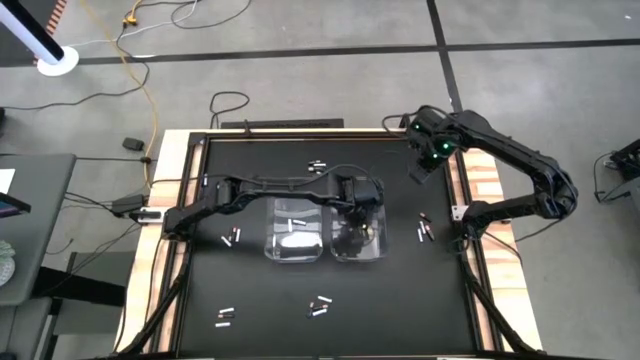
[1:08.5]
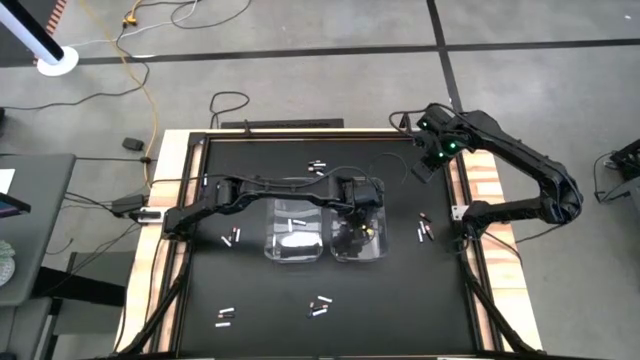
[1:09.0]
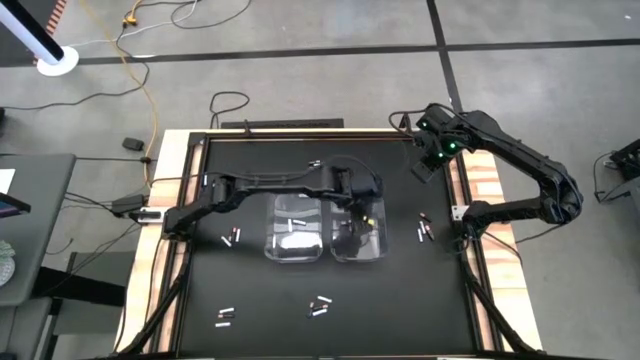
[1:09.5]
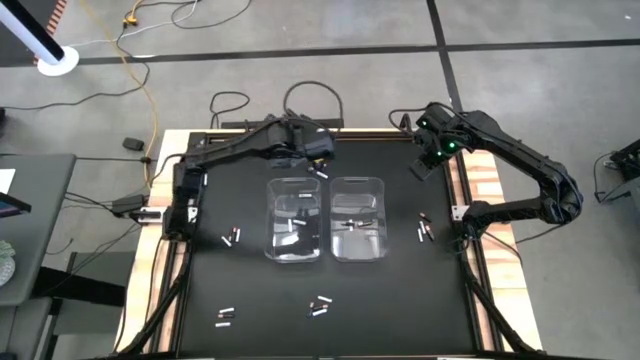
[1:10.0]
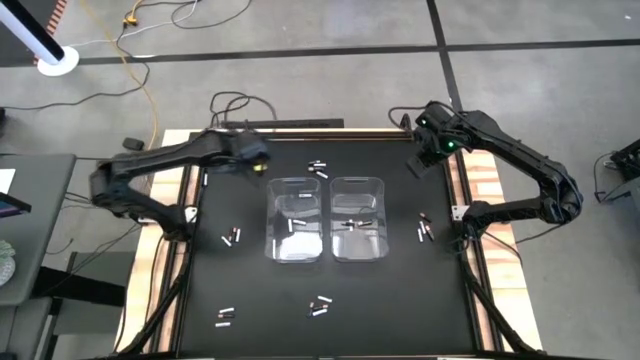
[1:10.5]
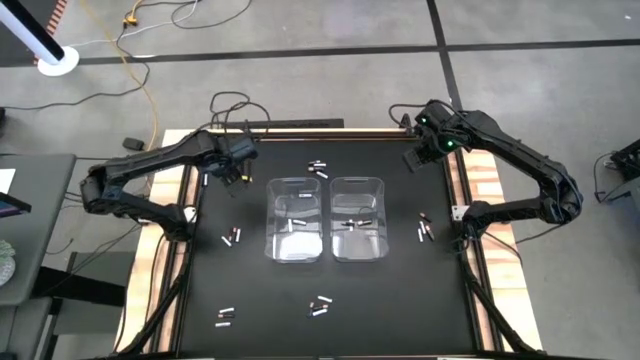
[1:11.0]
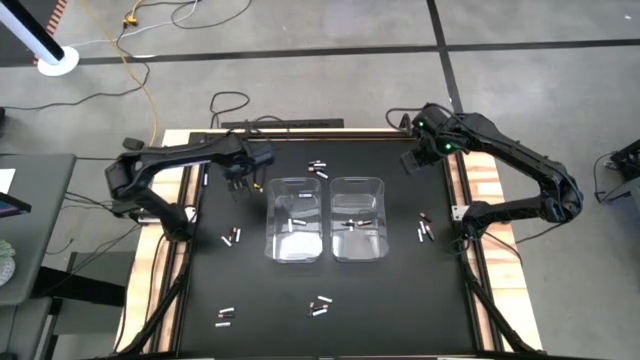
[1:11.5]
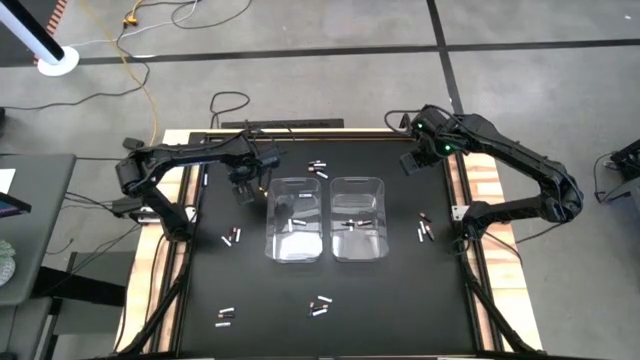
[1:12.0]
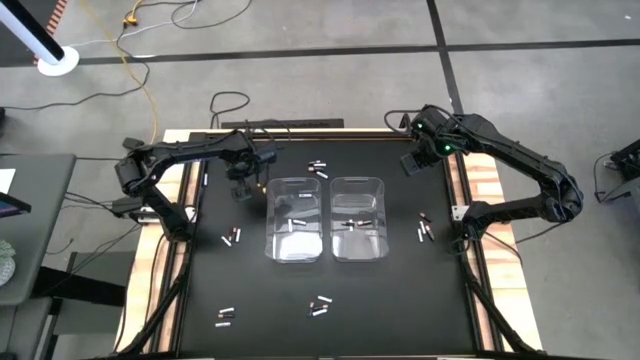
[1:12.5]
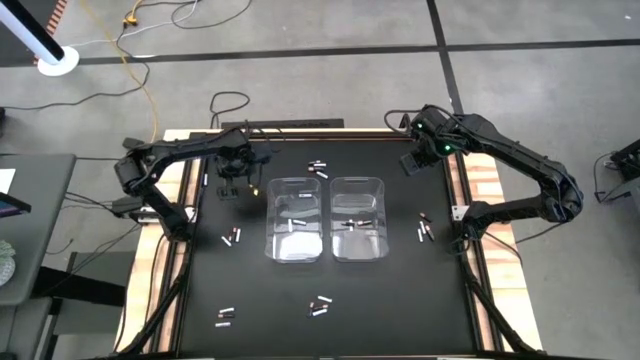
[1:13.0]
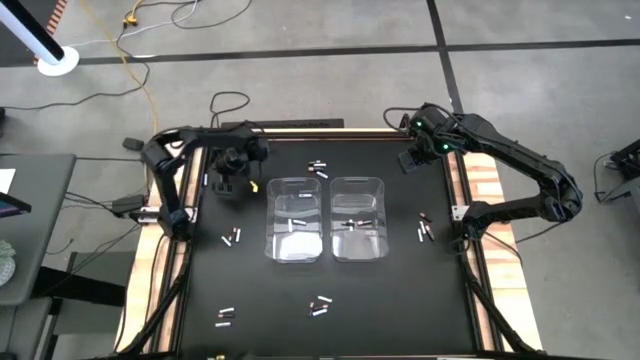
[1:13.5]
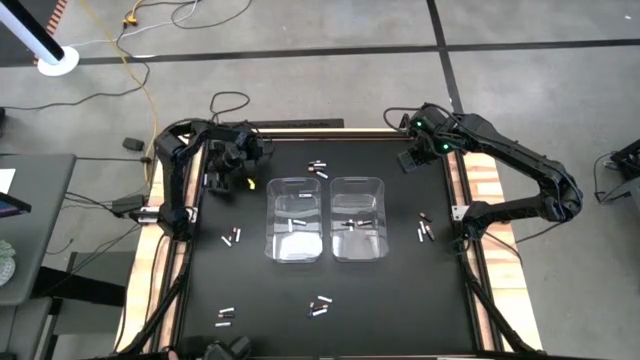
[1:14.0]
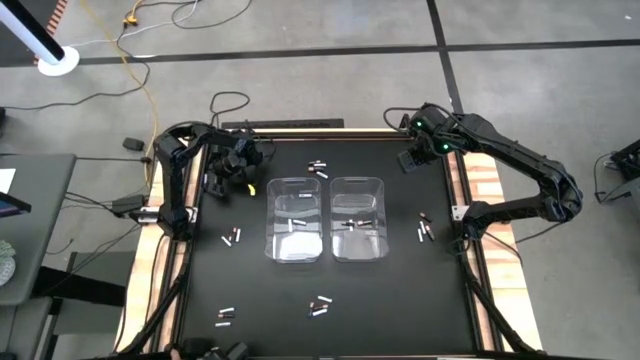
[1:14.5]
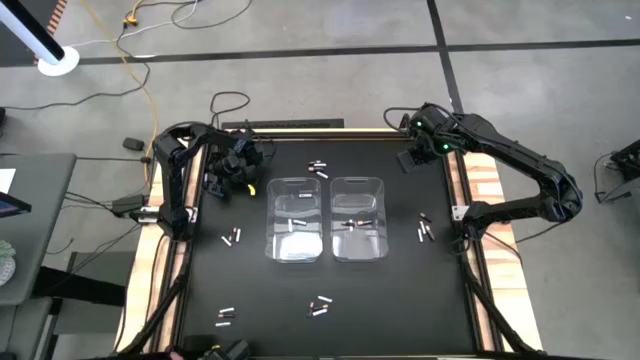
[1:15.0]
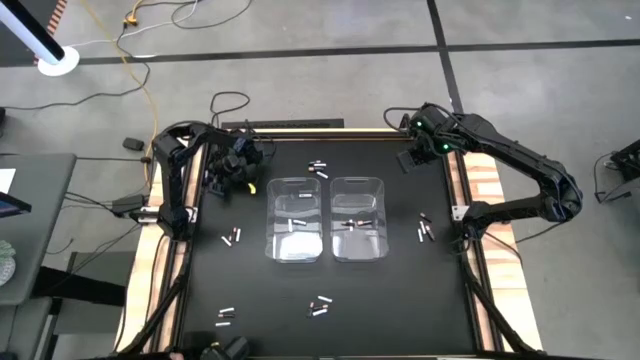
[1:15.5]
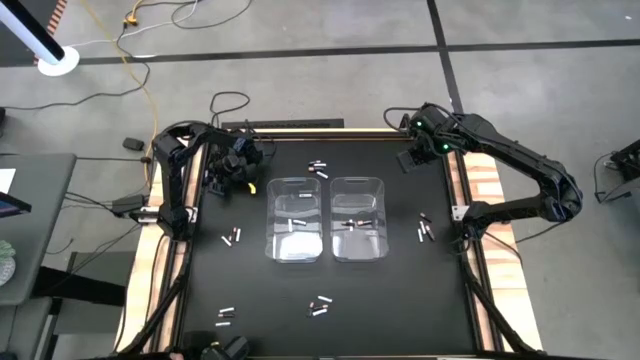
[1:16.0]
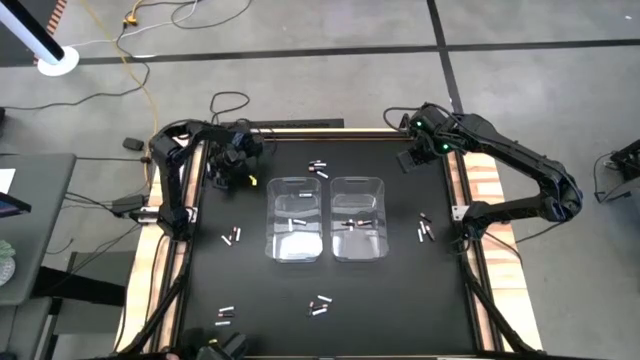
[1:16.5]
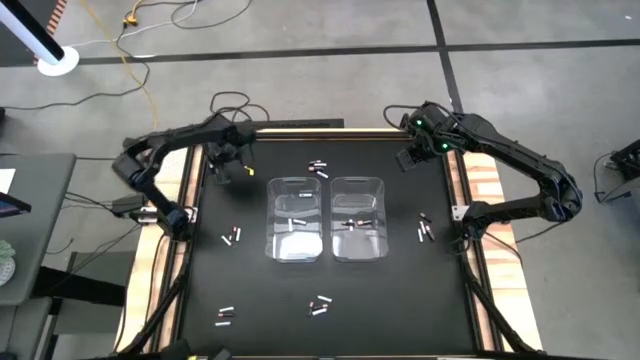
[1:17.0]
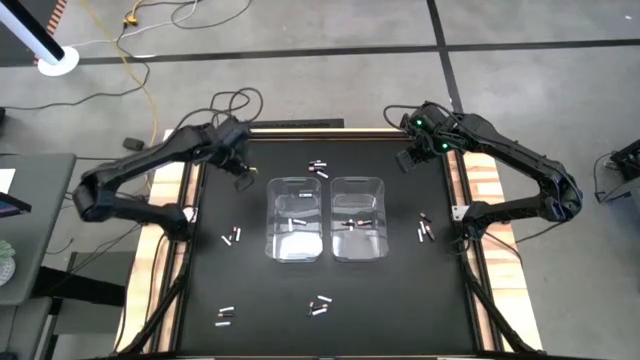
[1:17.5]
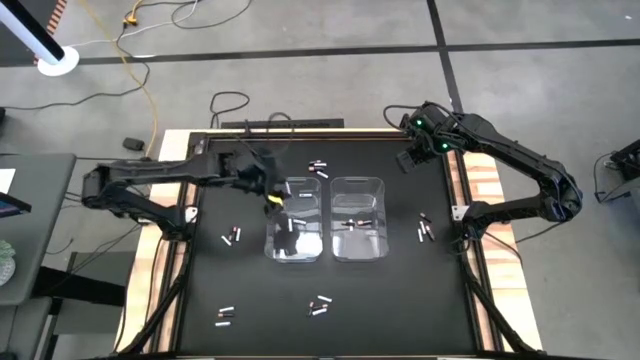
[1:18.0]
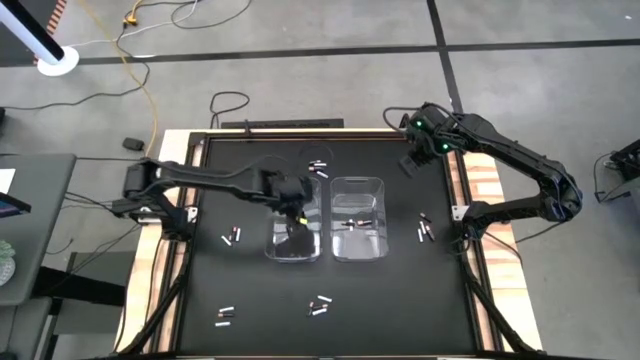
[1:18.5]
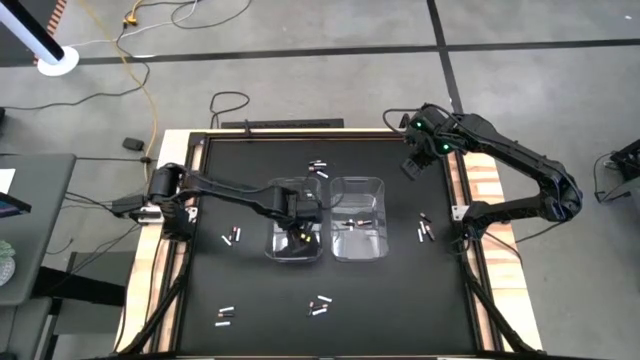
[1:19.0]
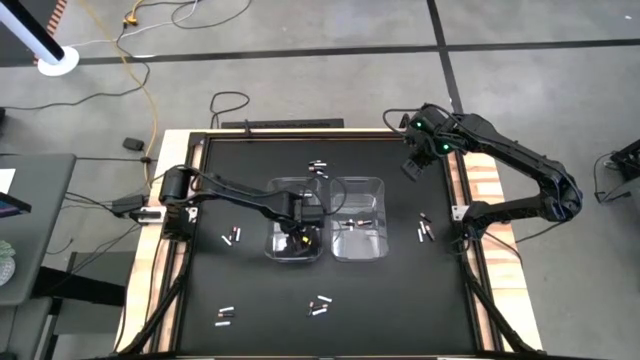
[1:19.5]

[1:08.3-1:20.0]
Task: Sort batteries
Put the white battery into the left transparent bin

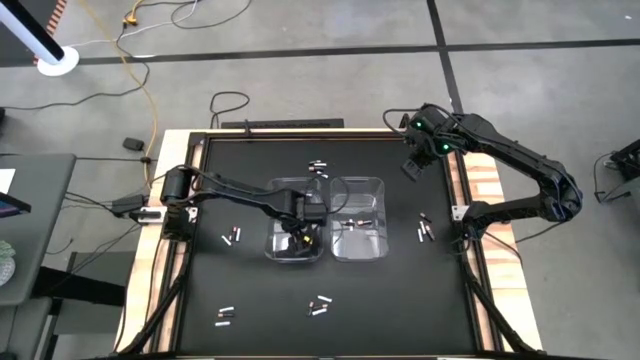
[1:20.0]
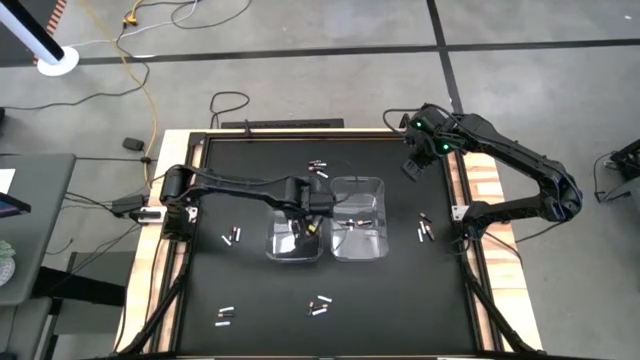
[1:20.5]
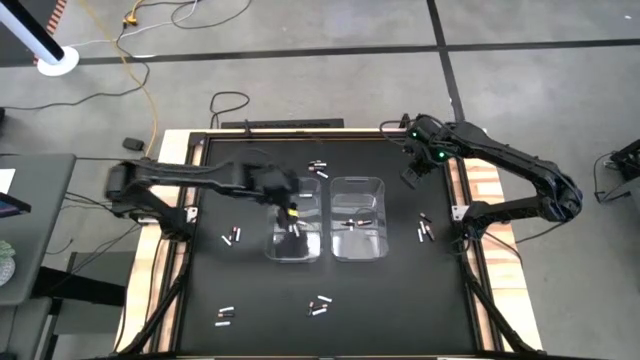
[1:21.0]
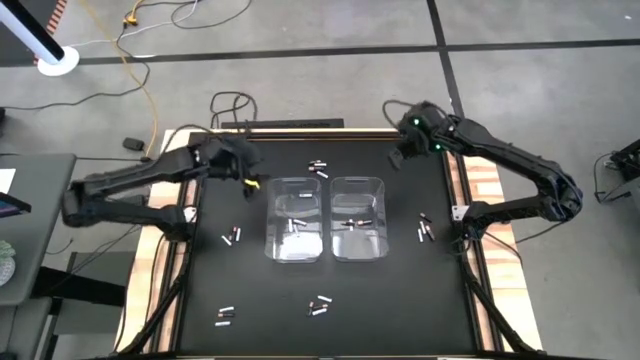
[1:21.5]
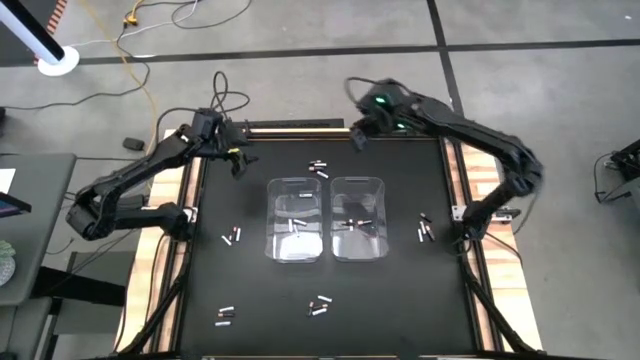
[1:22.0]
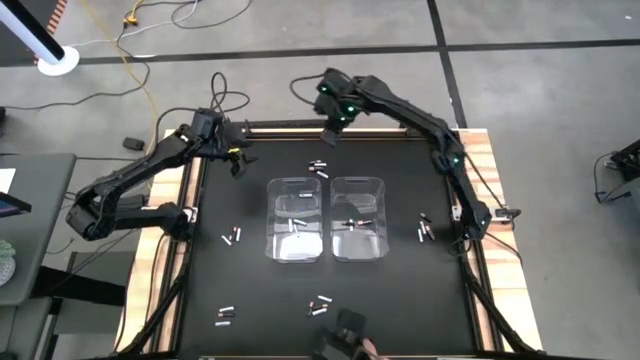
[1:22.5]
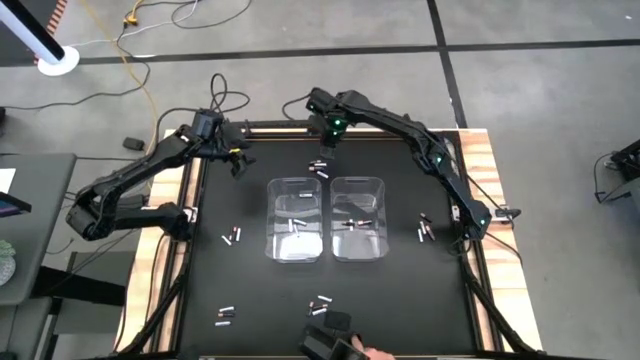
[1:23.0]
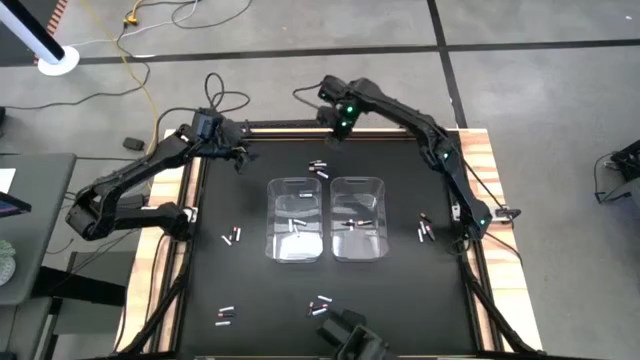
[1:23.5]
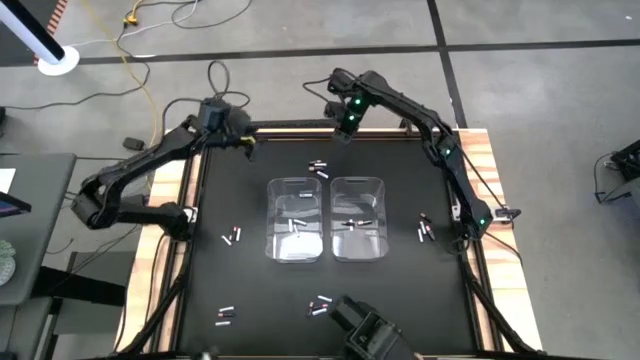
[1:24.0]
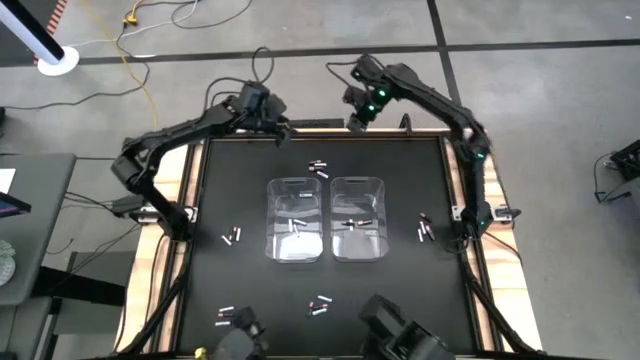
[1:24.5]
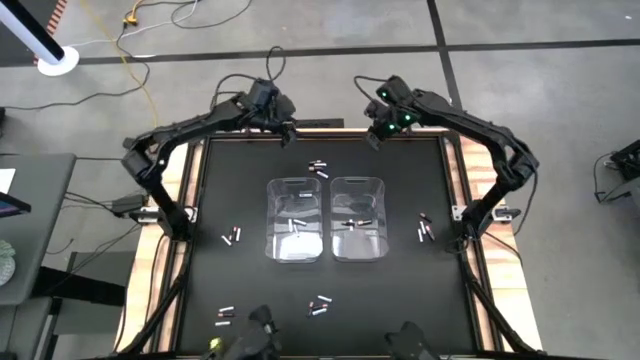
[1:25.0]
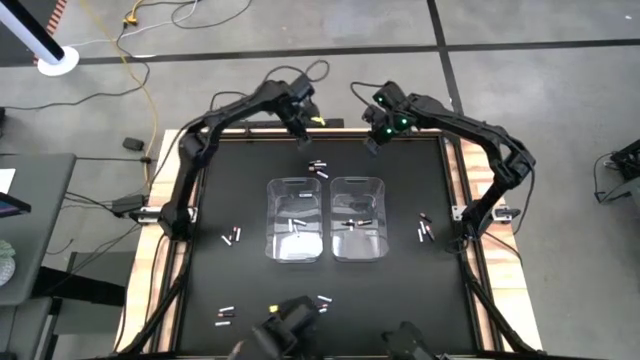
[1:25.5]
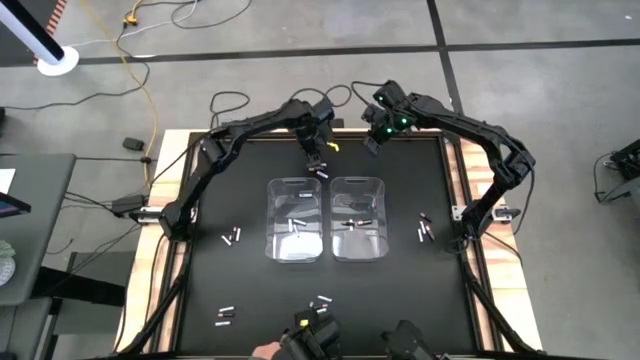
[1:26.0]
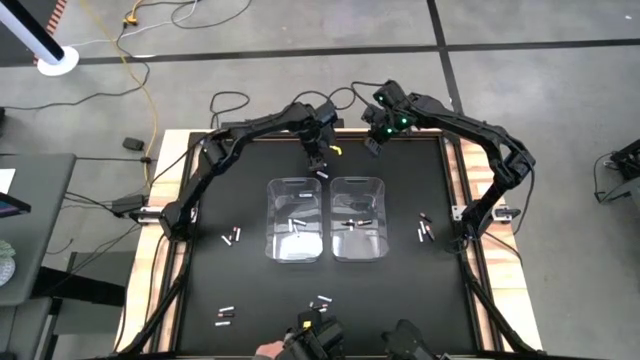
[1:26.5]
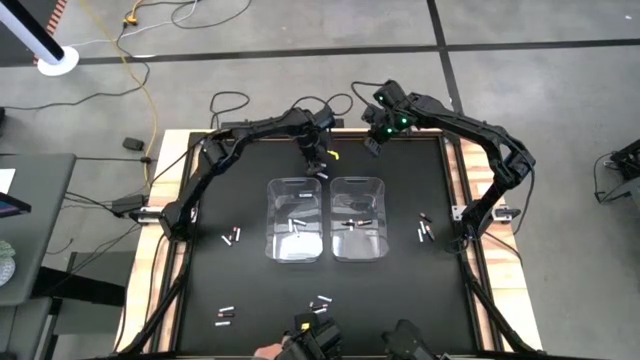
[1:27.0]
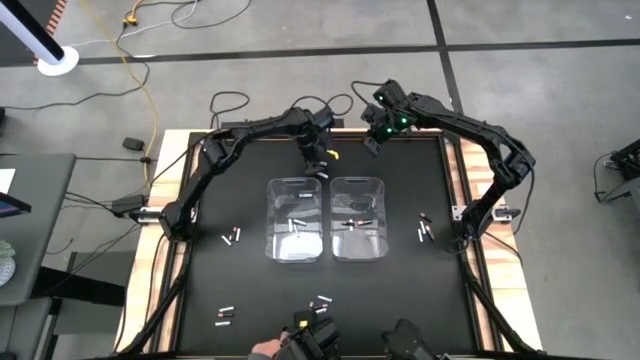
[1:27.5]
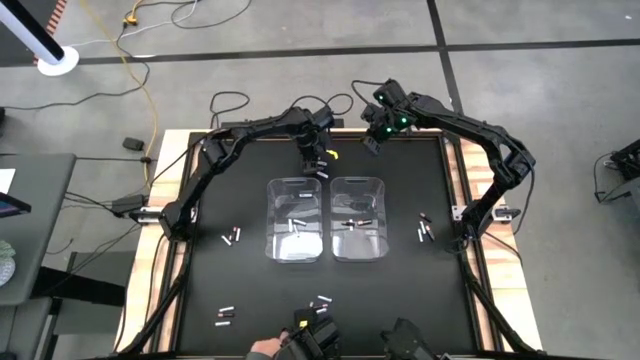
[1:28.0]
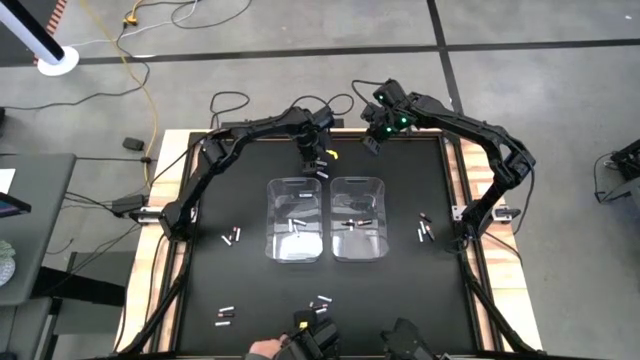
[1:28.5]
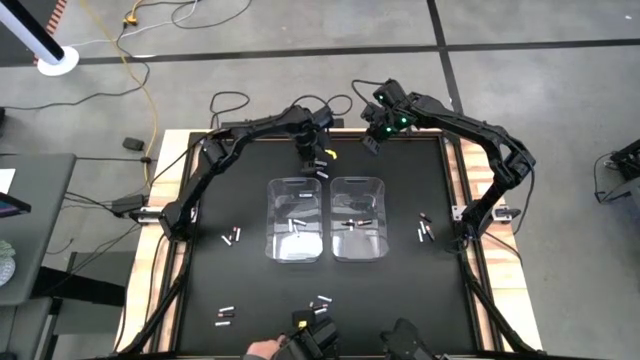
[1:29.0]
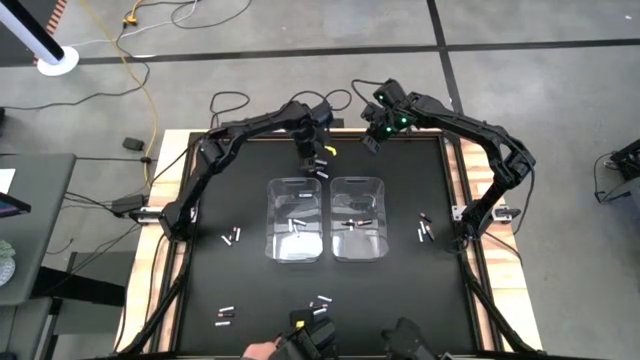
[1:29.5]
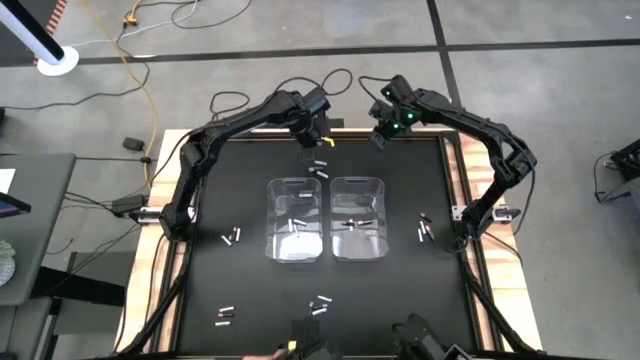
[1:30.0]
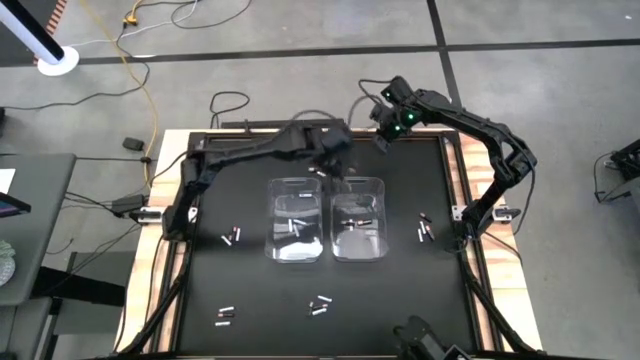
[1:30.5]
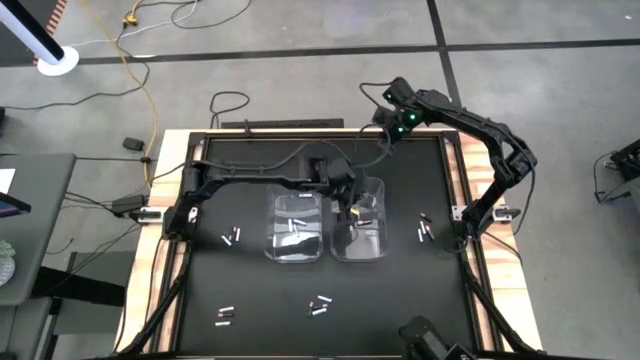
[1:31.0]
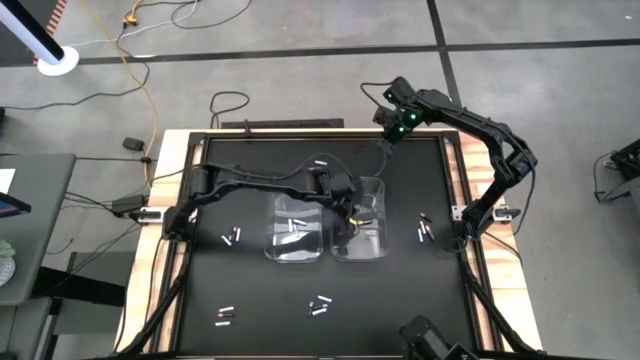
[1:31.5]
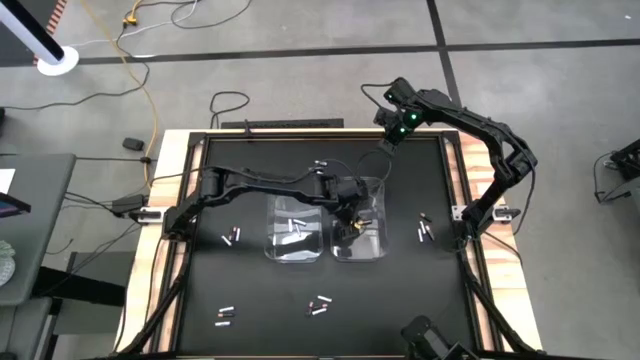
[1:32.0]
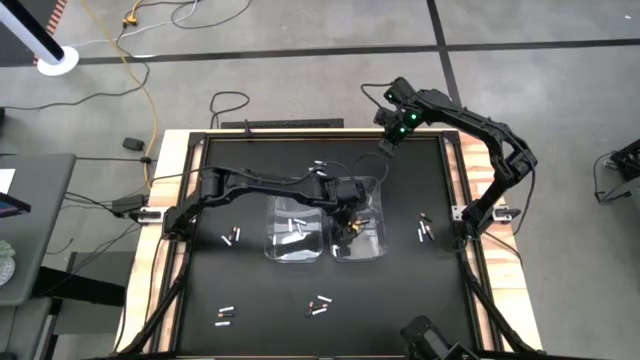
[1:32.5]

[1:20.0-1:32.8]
Put the black battery into the right transparent bin
